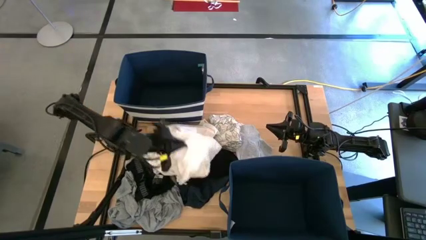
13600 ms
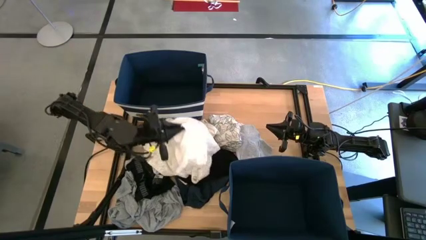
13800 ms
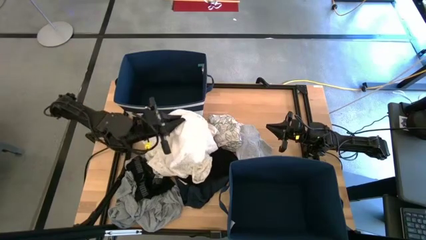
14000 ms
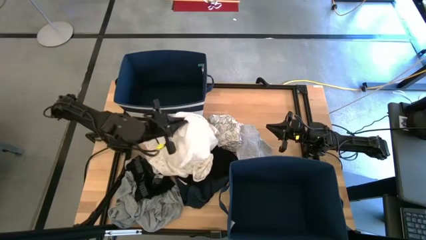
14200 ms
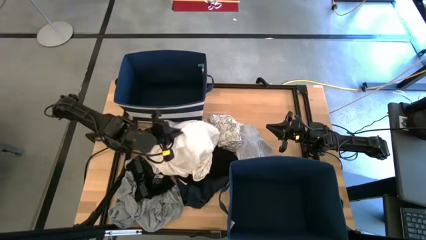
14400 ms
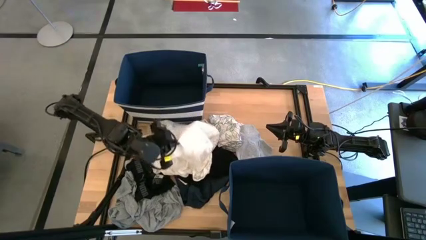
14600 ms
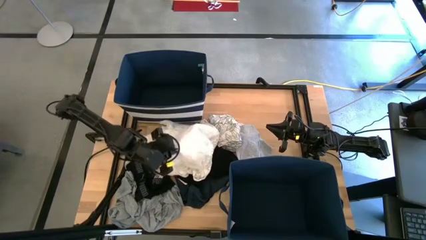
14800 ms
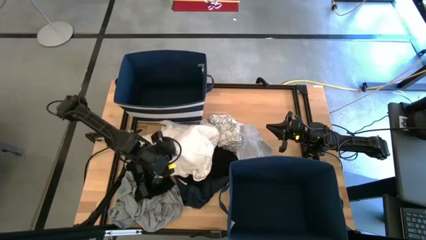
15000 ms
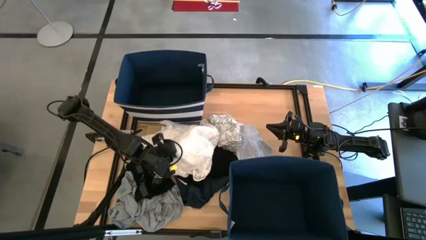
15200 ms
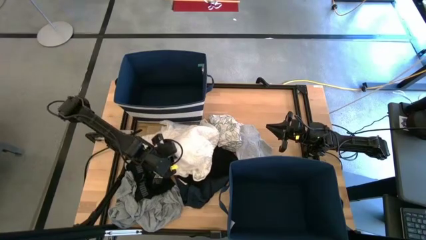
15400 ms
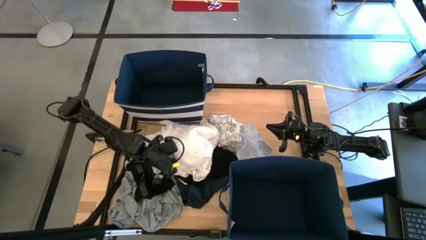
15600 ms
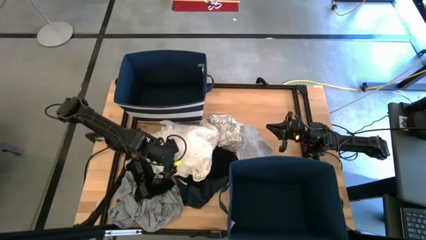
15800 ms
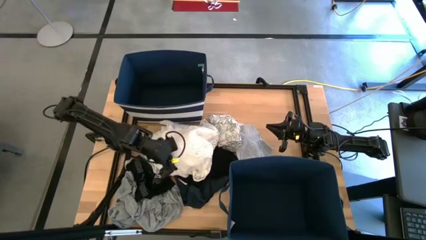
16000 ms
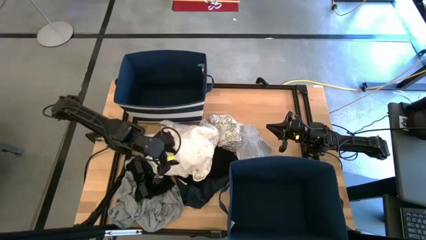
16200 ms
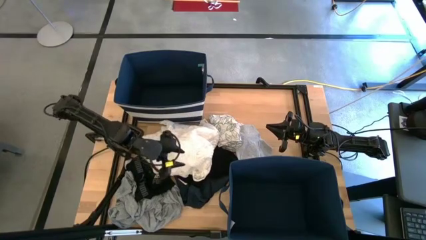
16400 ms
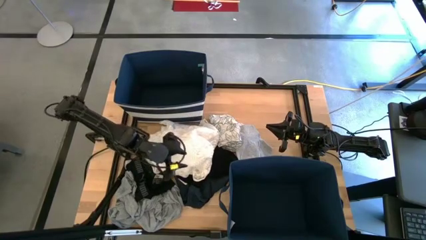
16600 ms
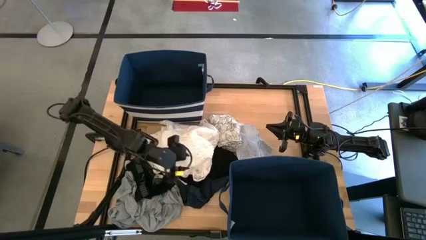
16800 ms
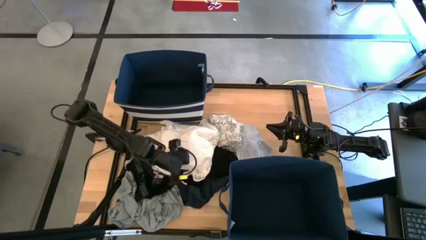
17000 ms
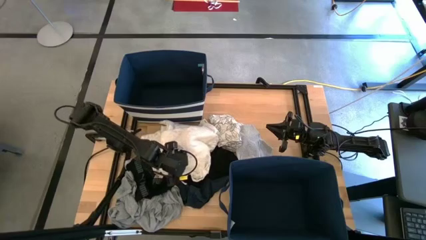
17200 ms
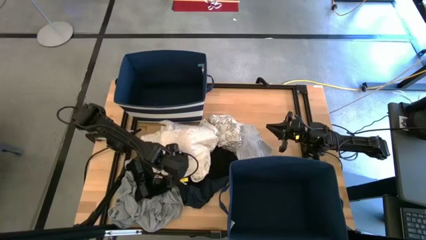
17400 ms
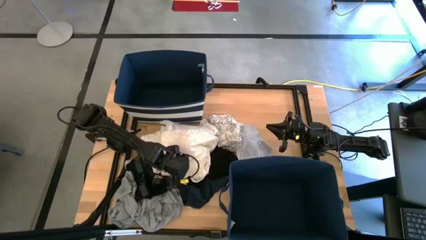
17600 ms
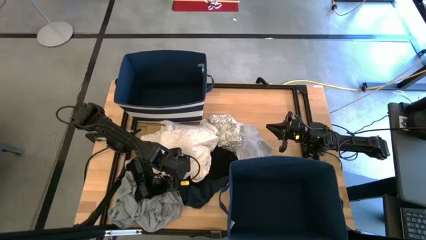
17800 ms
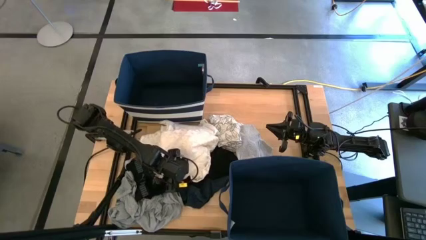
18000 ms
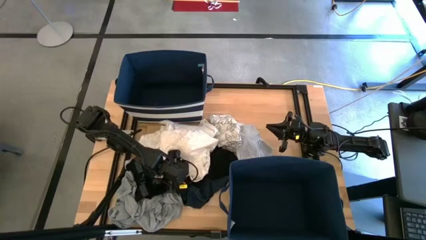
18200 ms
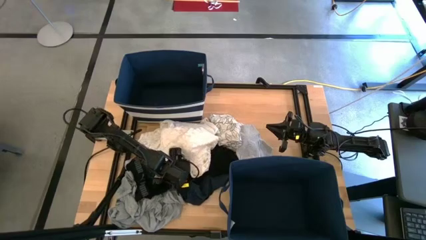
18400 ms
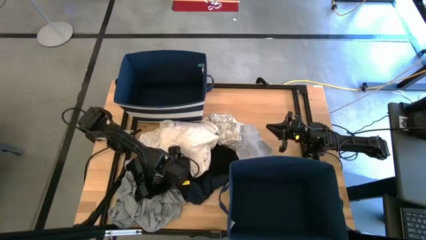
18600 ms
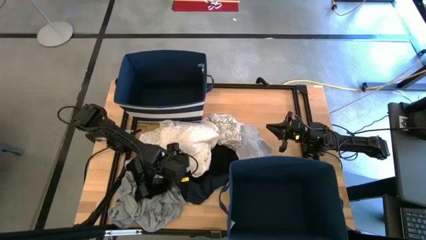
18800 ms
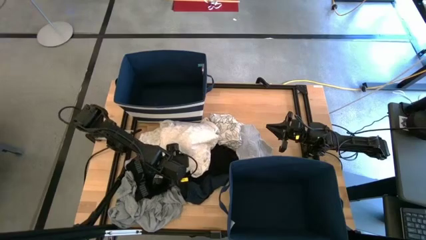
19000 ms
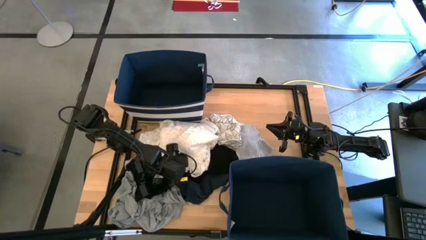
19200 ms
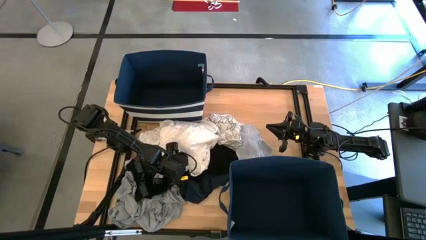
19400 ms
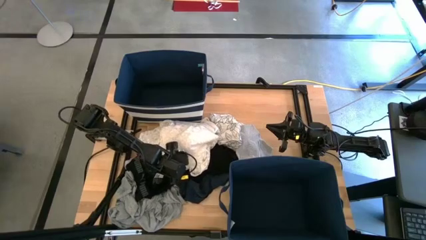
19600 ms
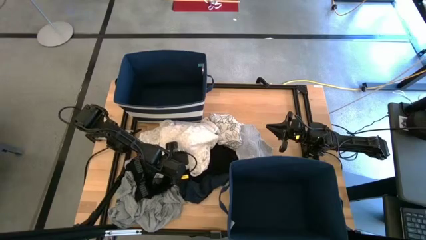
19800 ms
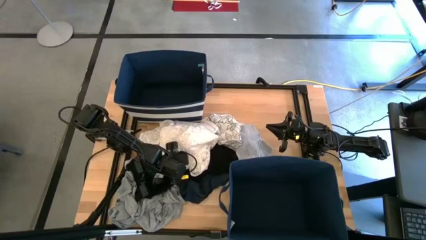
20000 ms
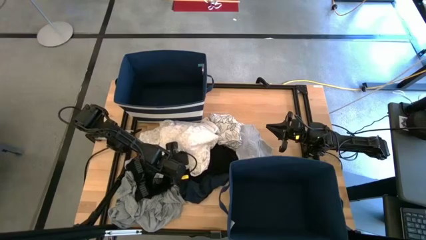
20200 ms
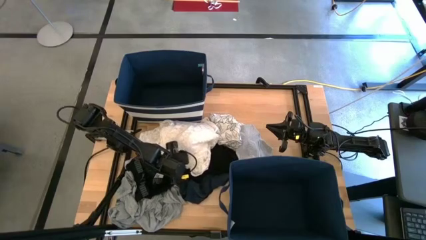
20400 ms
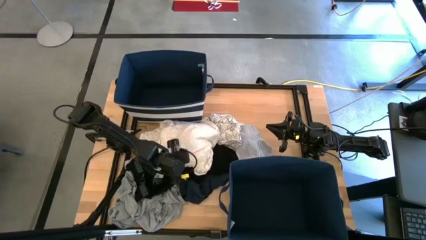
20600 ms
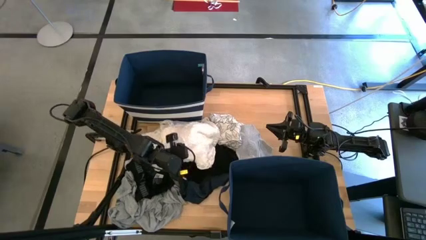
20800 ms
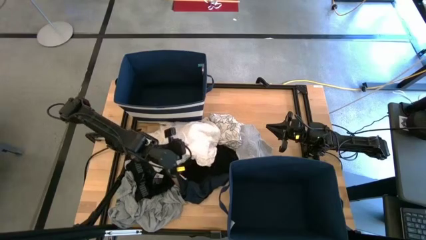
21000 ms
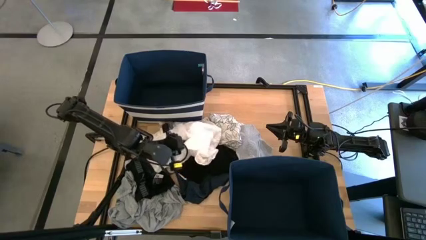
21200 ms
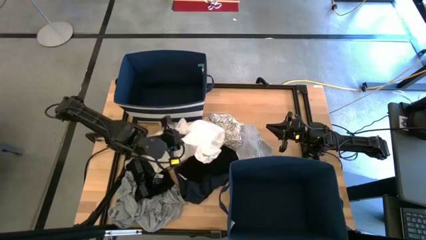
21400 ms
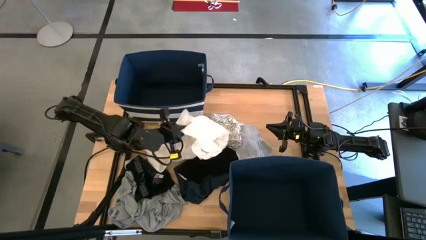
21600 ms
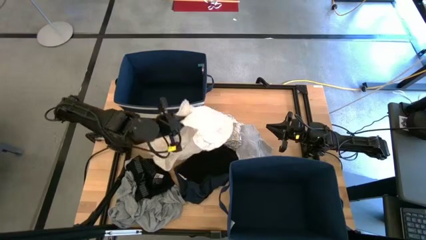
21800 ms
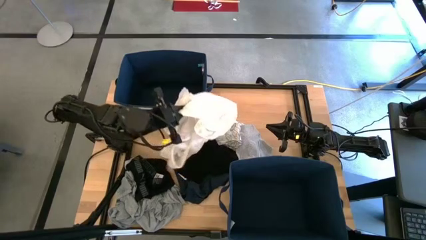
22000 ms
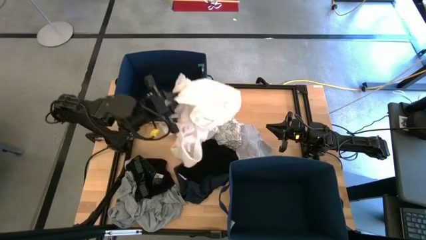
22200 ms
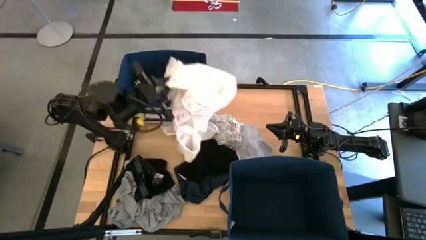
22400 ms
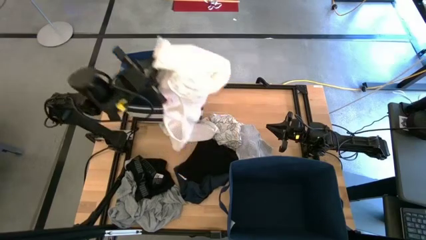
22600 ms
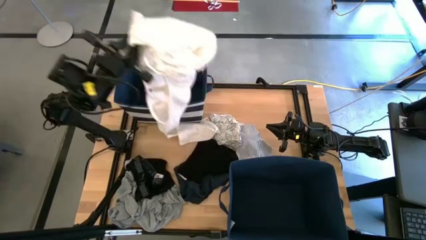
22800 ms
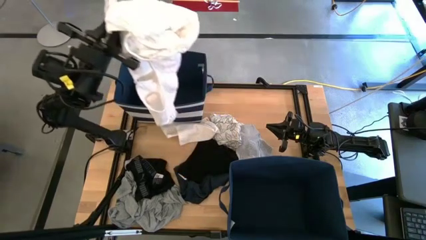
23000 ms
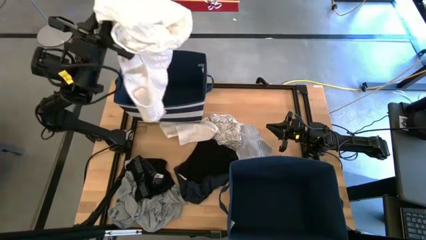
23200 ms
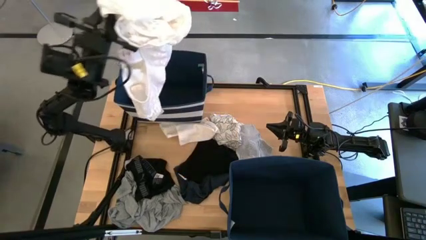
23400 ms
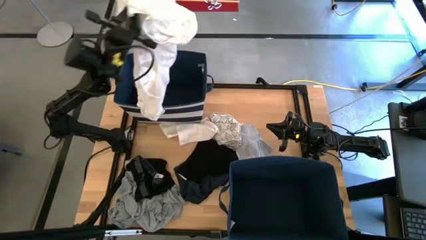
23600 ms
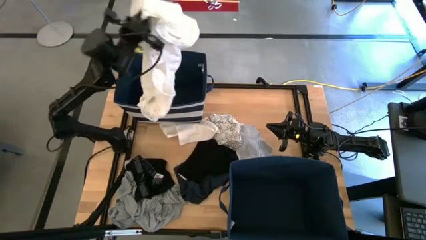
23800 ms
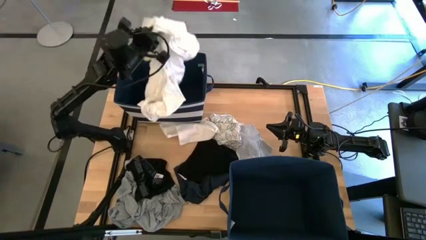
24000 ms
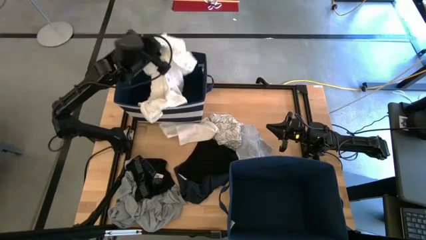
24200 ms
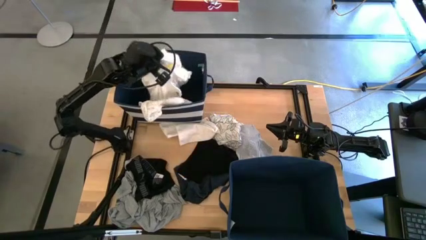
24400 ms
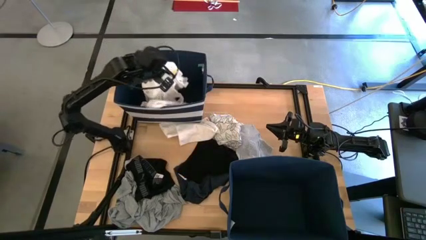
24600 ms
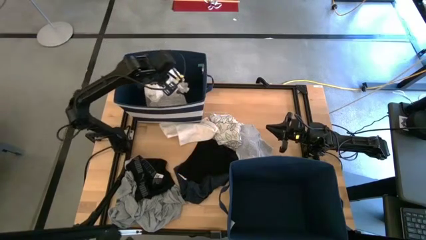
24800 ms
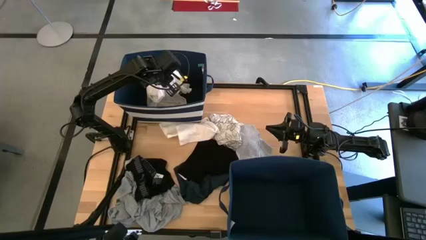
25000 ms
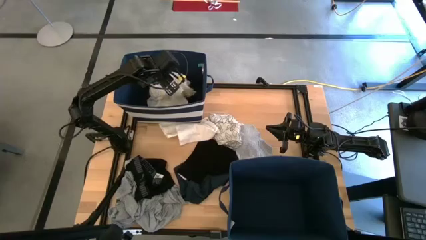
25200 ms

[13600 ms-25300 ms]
Task: Sort clothes
Put the white dress into the top blue laundry organizer

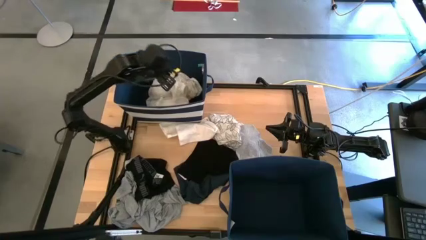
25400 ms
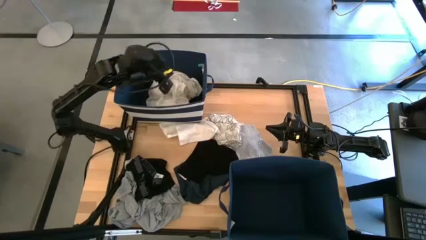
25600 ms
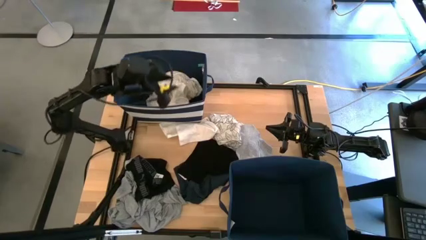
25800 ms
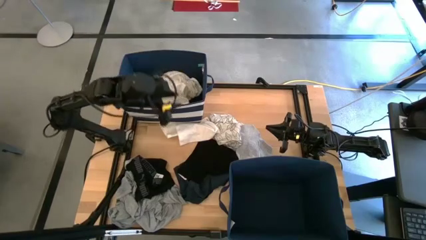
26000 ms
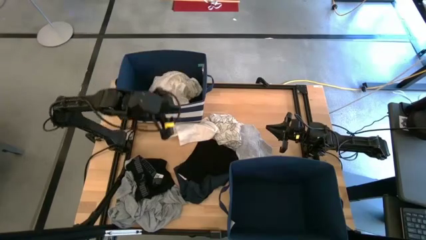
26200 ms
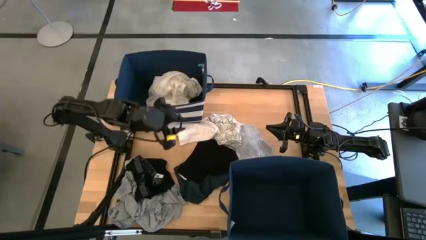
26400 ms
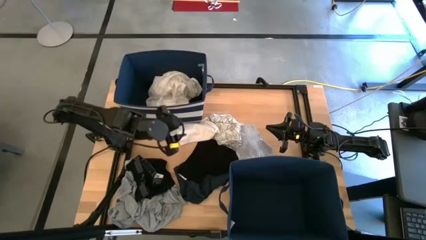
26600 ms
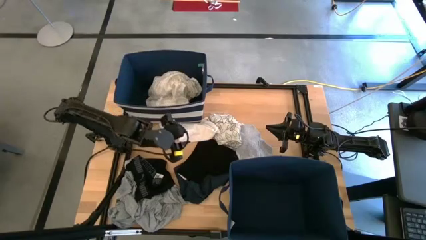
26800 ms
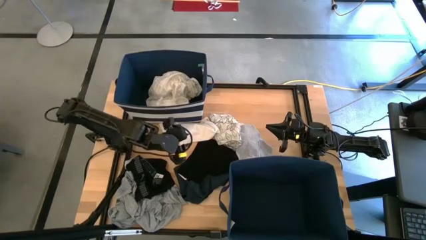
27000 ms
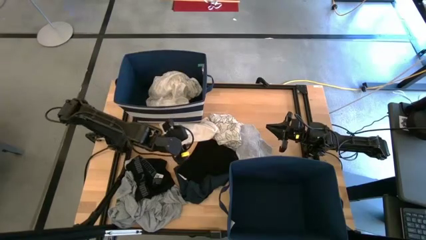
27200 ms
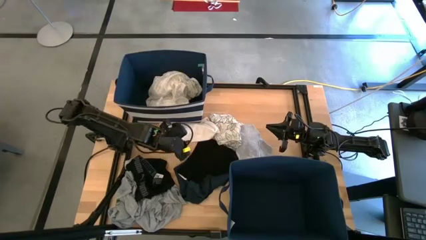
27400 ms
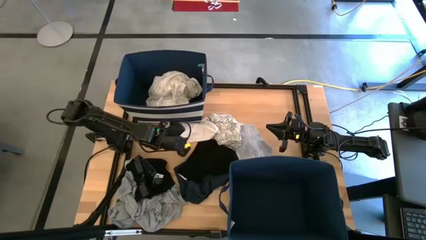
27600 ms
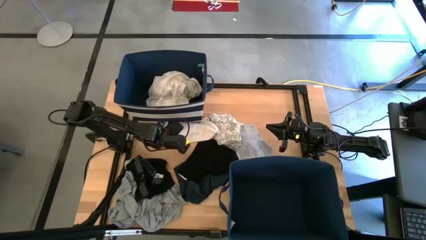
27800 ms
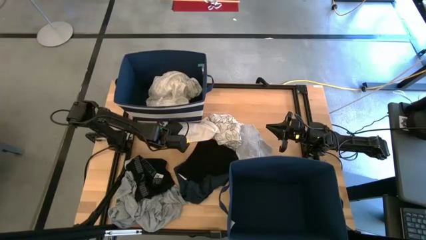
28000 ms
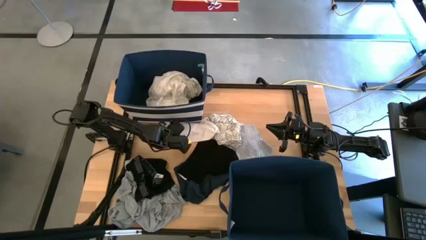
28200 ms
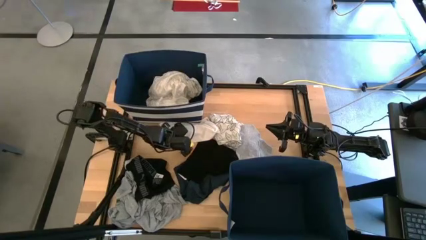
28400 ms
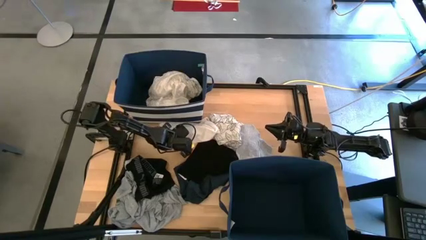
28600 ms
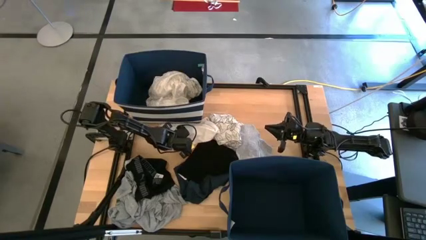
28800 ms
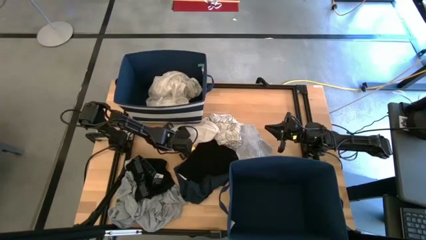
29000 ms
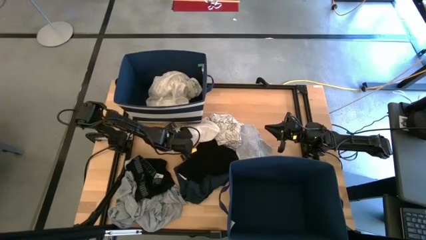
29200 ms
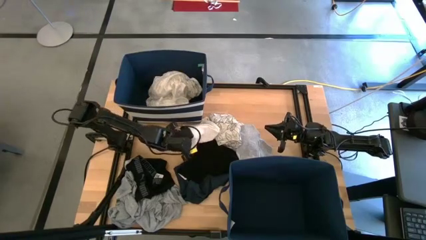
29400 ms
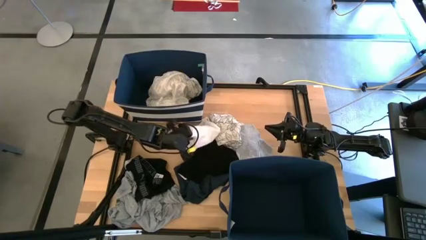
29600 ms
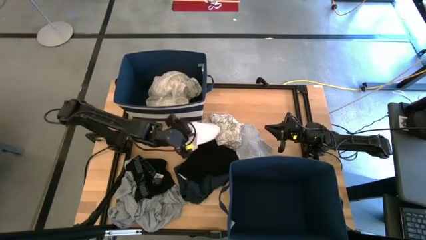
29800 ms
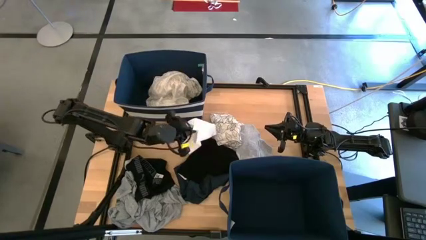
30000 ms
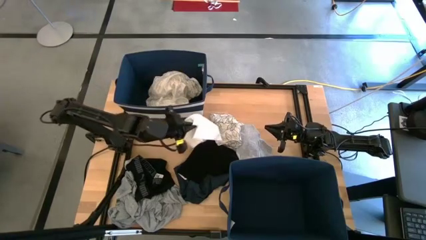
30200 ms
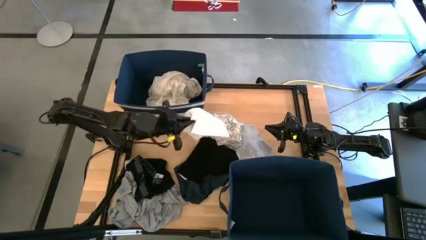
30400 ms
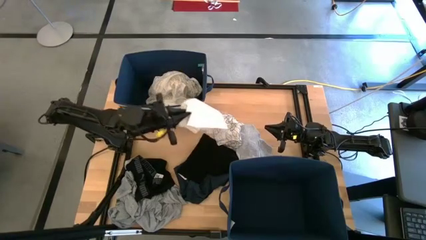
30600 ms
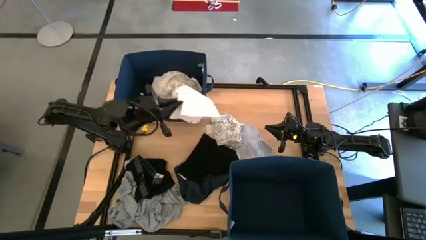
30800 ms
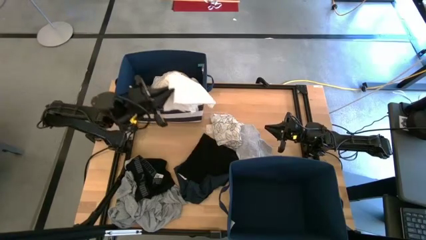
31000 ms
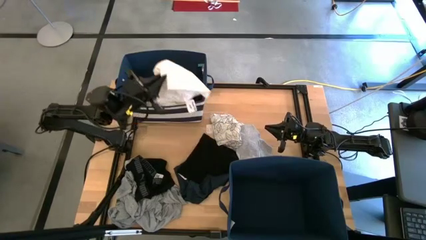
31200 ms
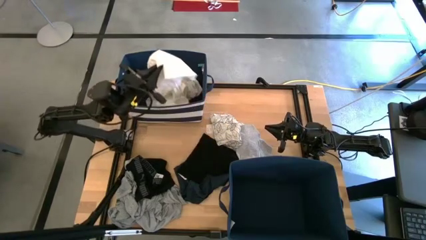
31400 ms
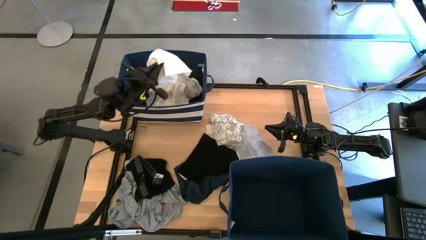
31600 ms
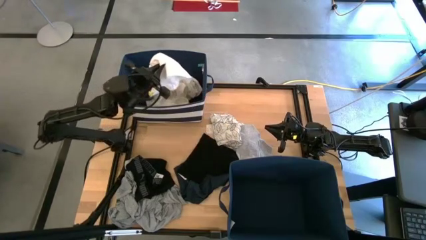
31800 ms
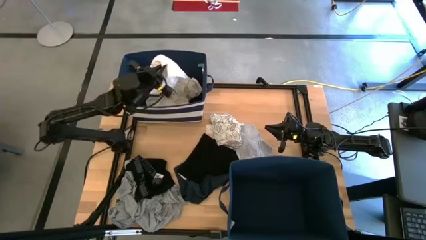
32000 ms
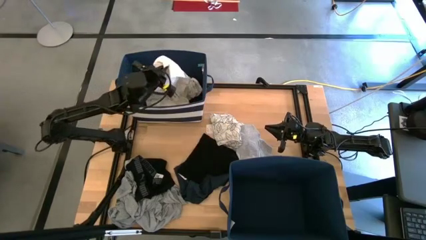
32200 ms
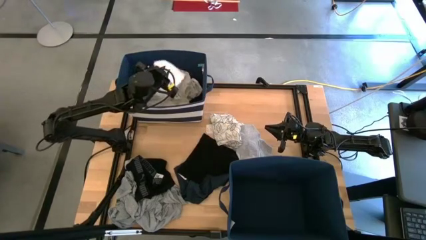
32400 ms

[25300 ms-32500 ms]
Put the white boxer into the top blue laundry organizer
